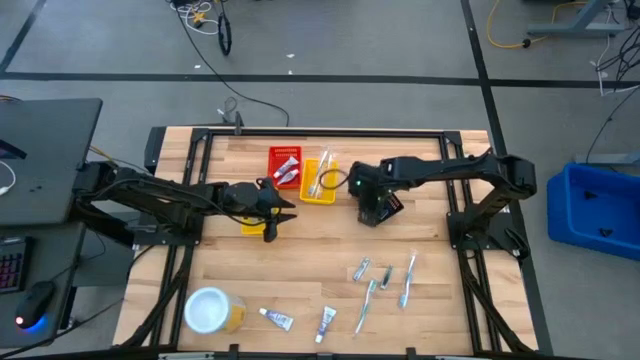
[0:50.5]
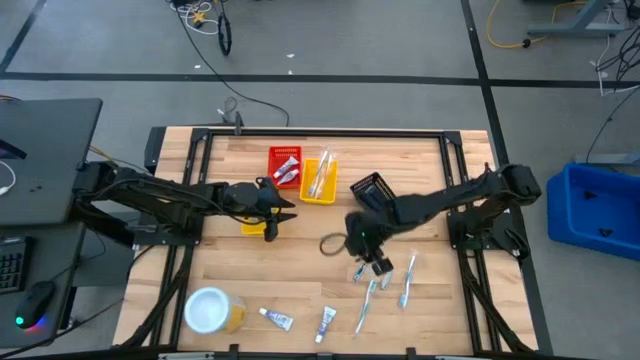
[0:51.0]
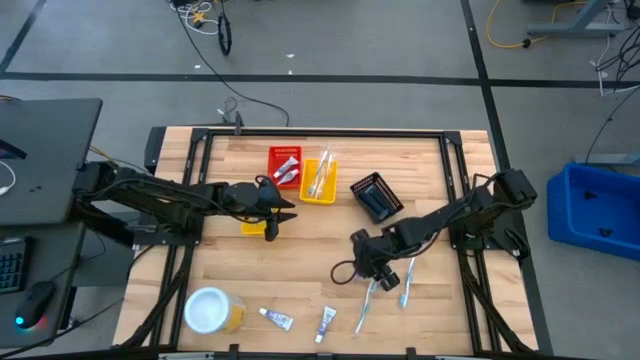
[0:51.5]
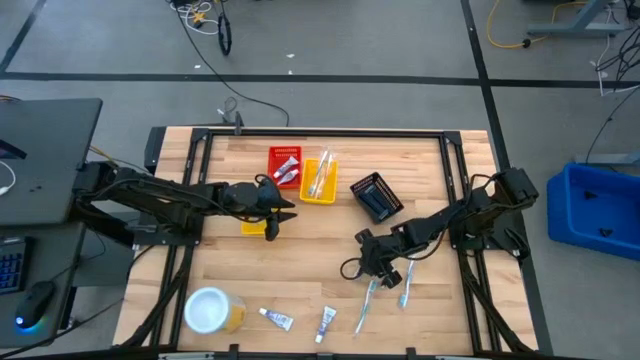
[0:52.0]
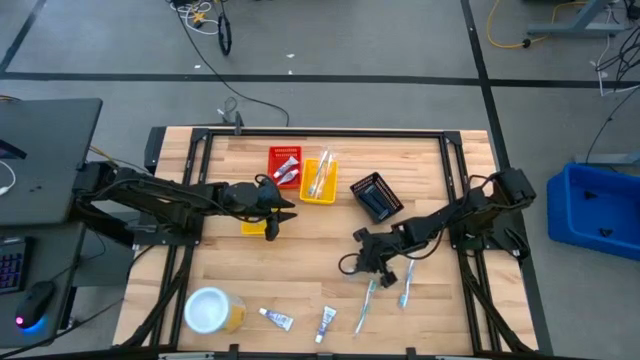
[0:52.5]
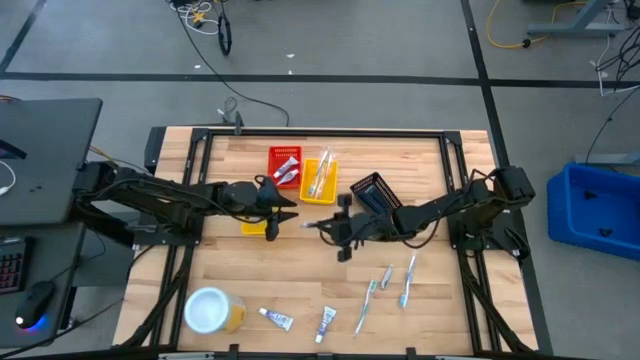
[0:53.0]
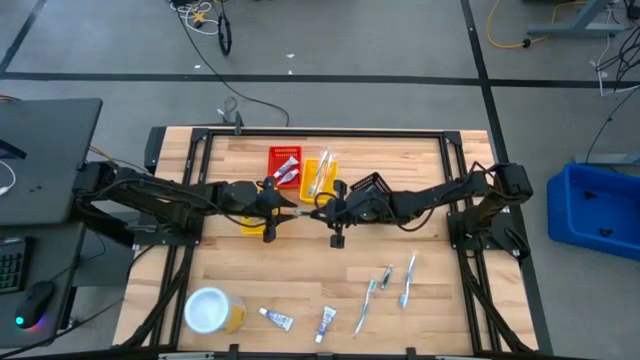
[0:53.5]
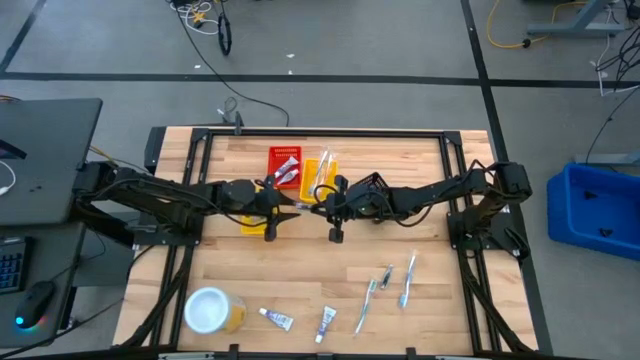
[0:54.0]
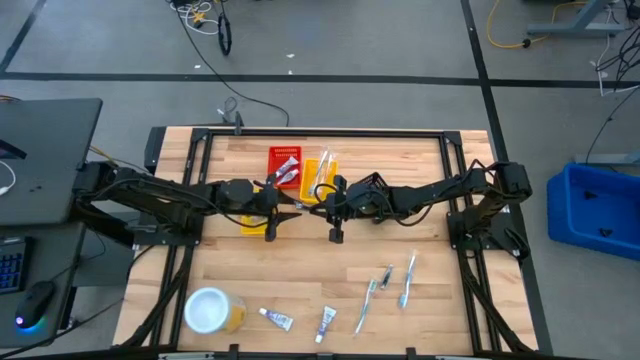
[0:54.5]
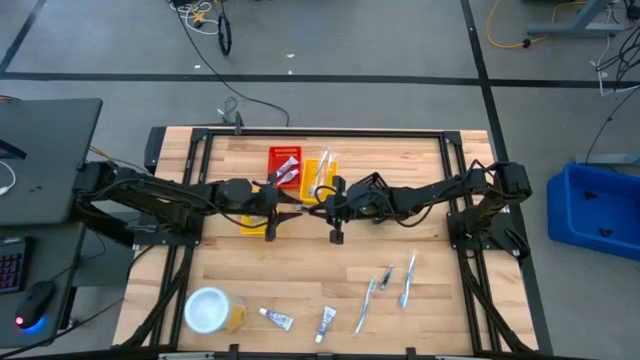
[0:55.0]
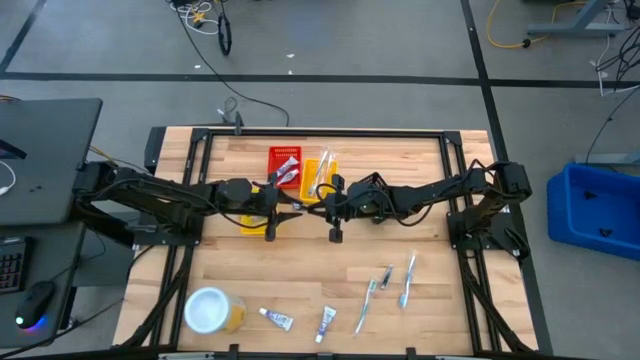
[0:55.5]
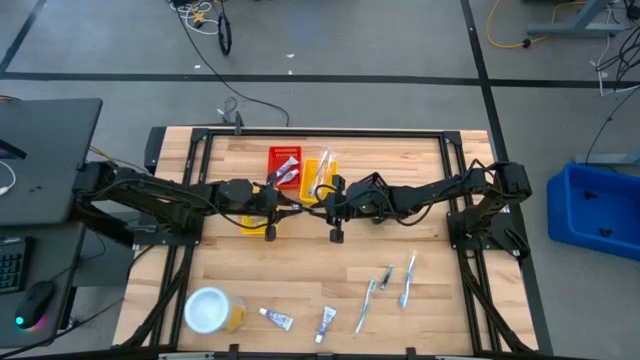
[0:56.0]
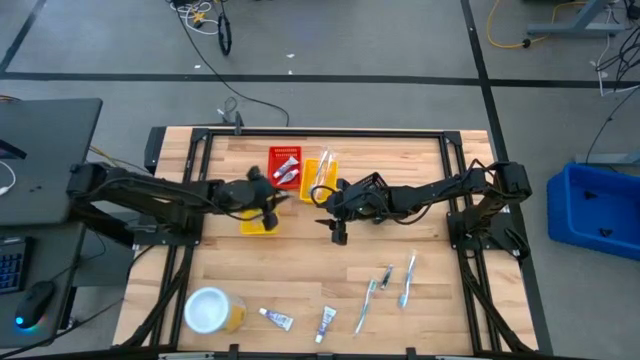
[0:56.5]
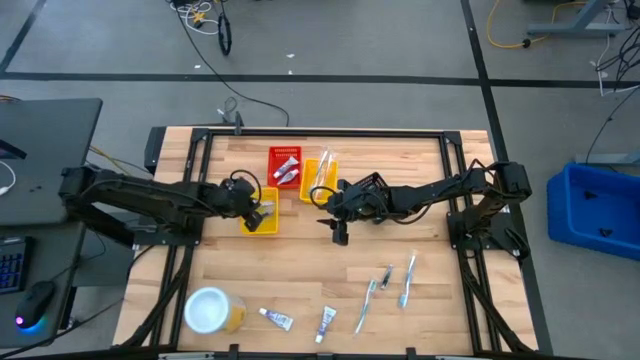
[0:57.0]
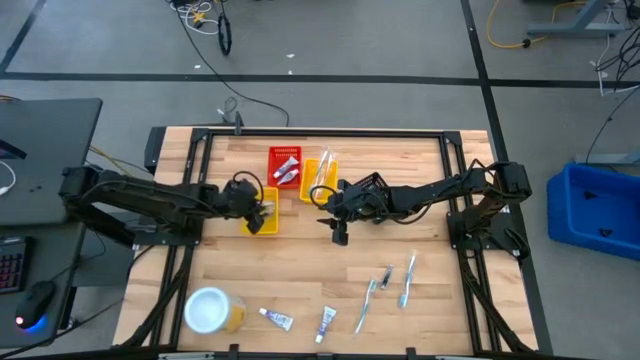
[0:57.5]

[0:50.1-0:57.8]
Task: Pick & Place Travel size toiletries
Put the nail cutter into the left yellow bin

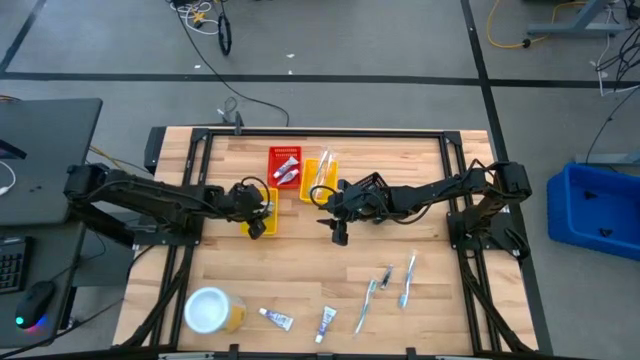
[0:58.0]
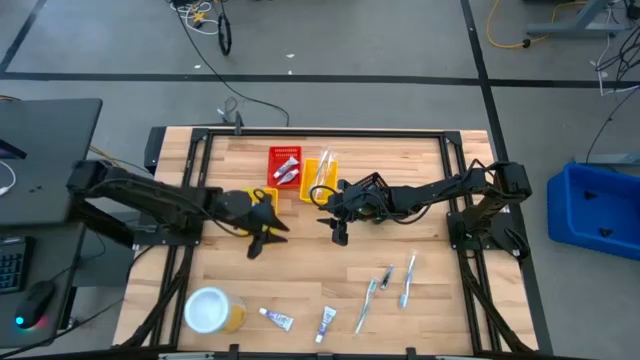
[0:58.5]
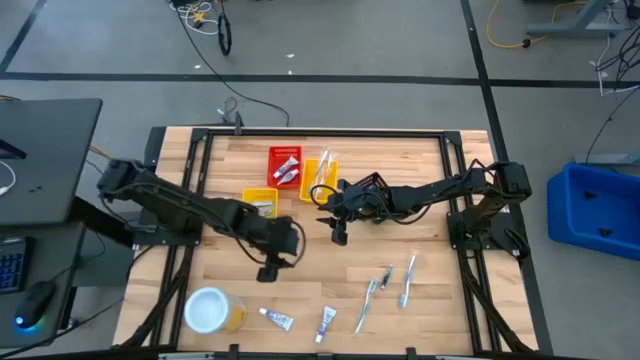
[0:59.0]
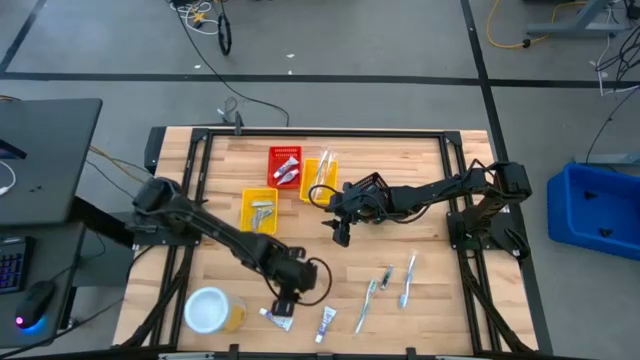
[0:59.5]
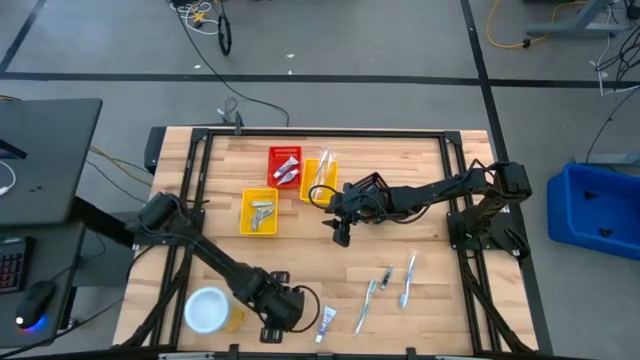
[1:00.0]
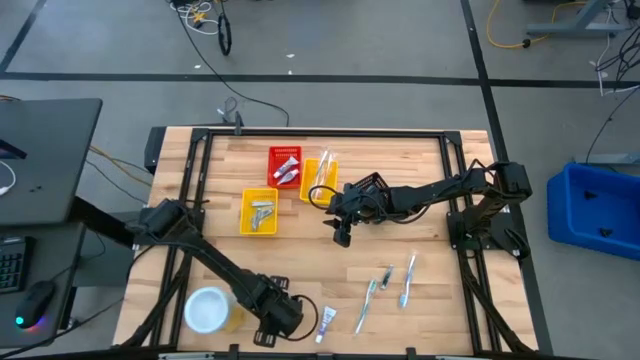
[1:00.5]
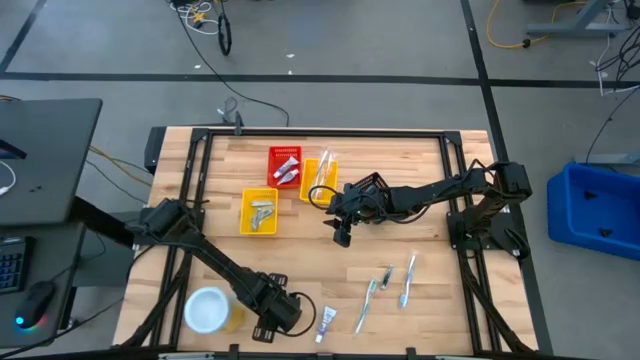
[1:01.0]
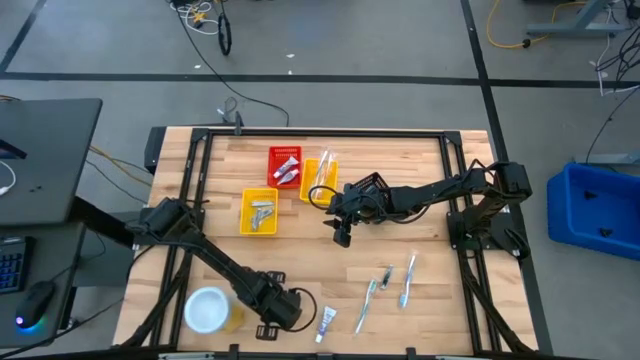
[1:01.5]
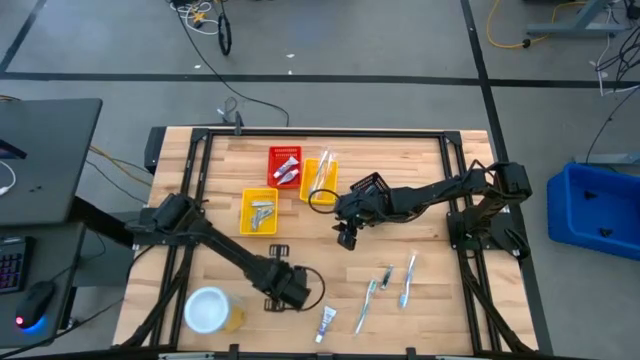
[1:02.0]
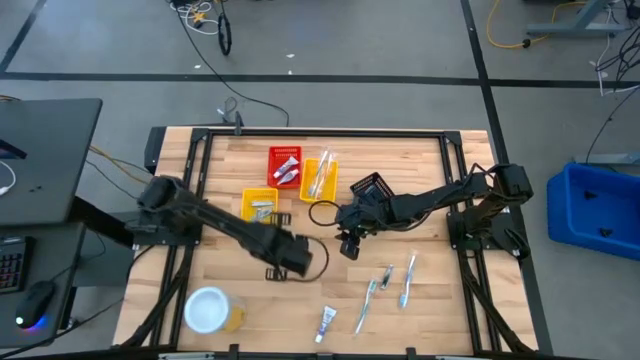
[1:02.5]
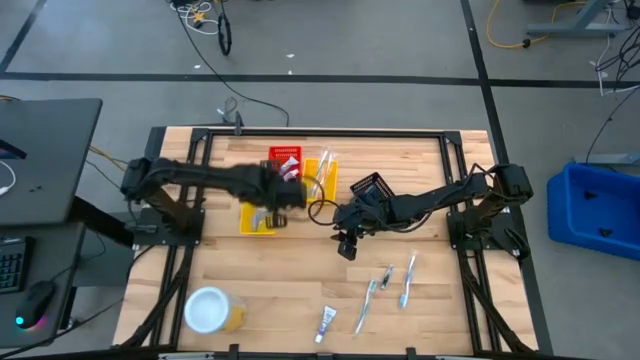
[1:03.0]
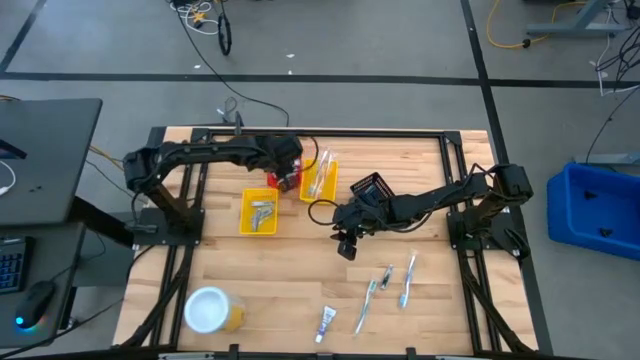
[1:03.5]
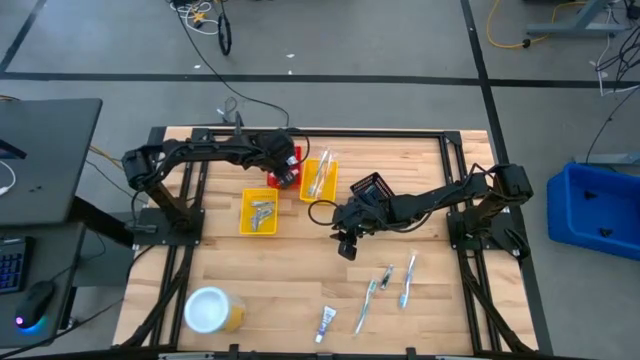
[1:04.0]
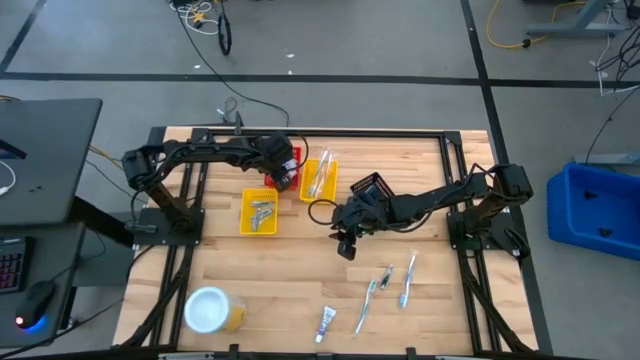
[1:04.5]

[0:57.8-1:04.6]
Put the toothpaste into the red bin

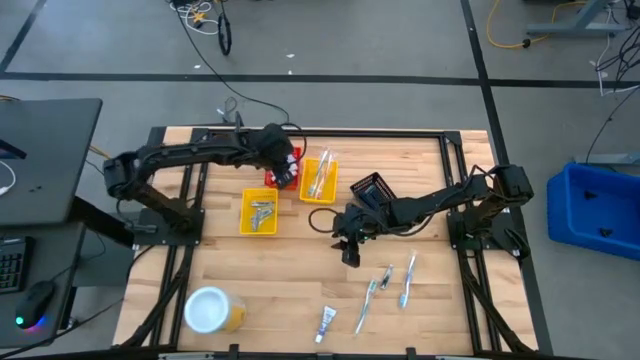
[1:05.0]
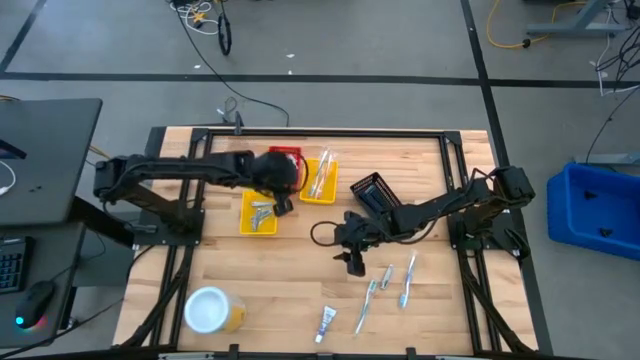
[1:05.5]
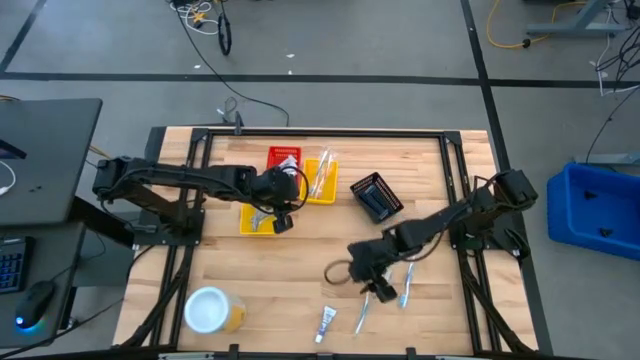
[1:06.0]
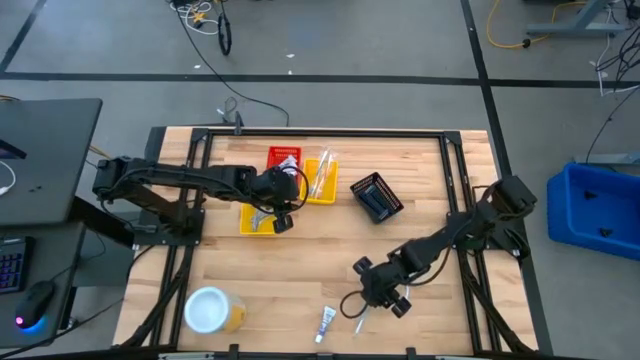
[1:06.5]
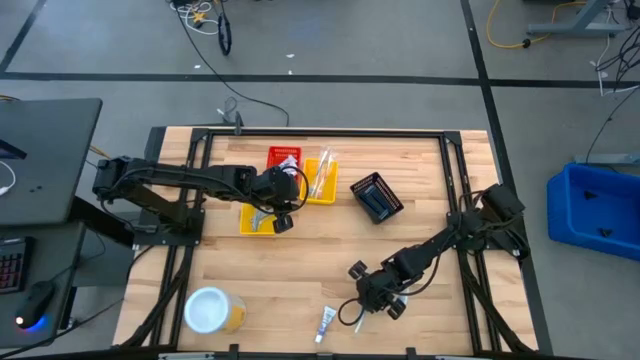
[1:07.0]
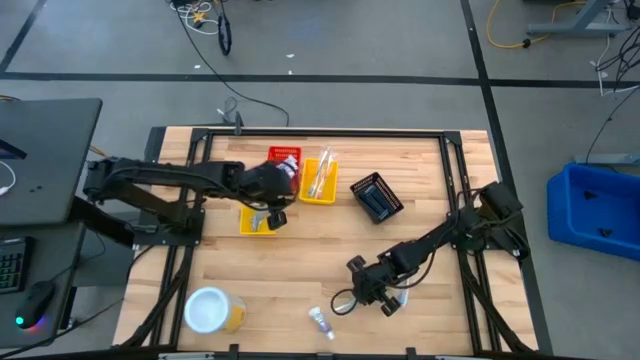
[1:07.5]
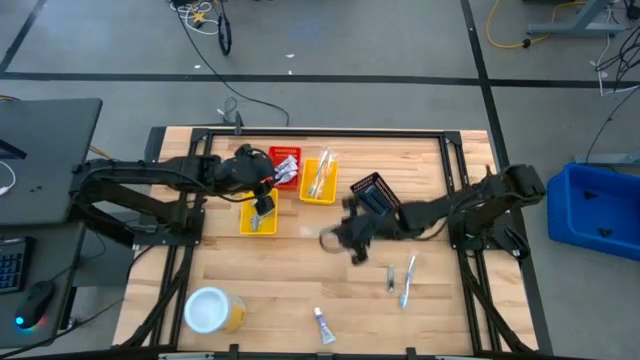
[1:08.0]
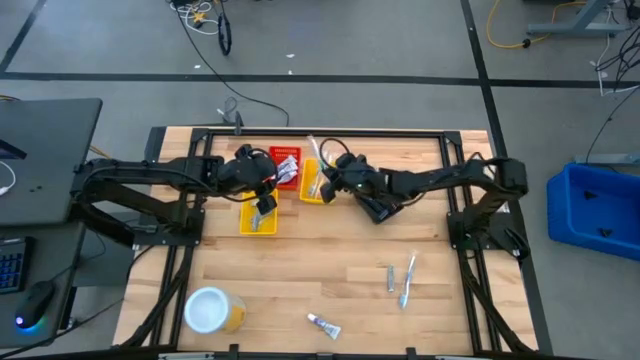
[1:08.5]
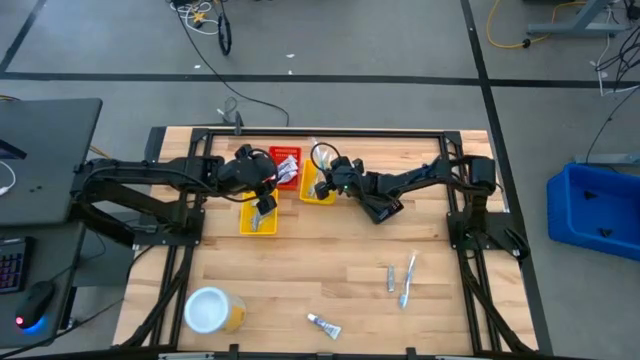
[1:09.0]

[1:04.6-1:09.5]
Put the blue toothbrush into the right yellow bin

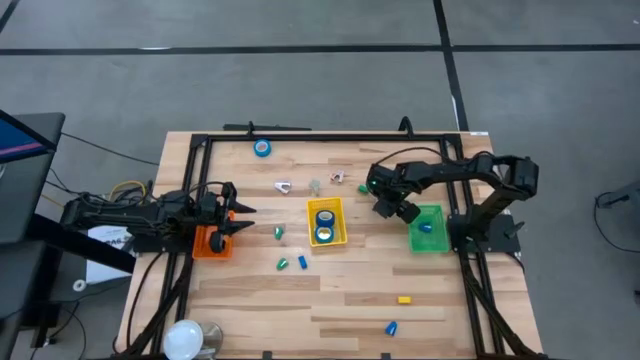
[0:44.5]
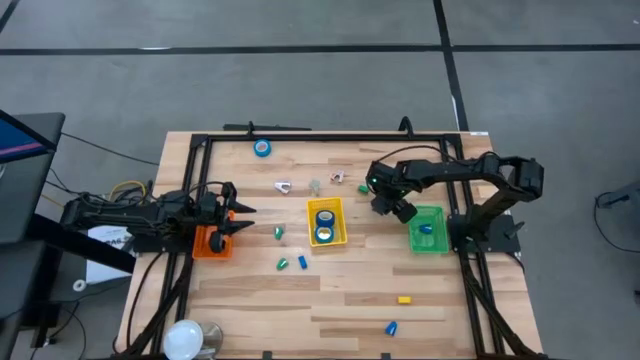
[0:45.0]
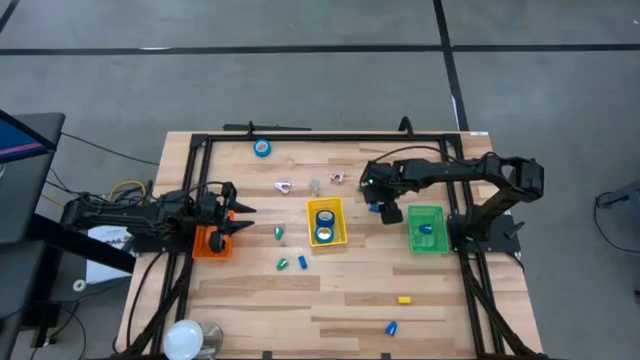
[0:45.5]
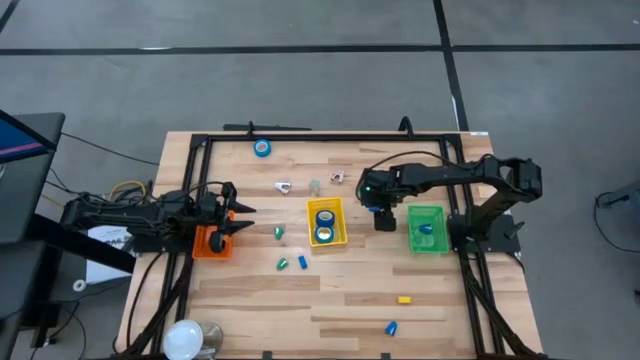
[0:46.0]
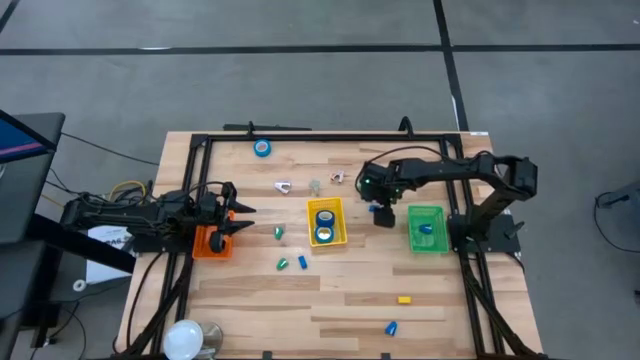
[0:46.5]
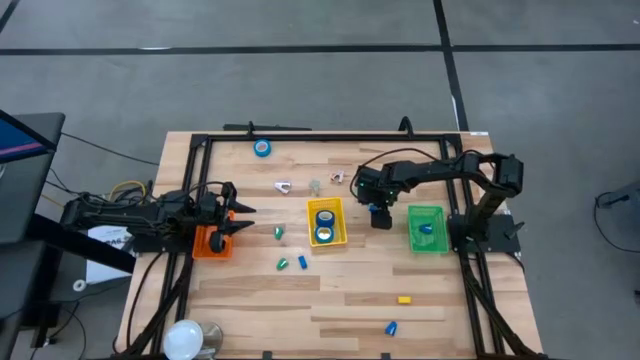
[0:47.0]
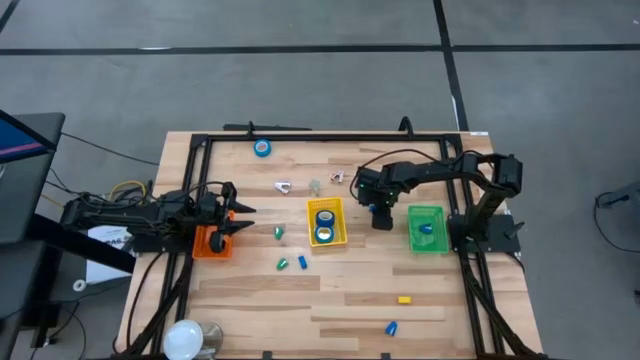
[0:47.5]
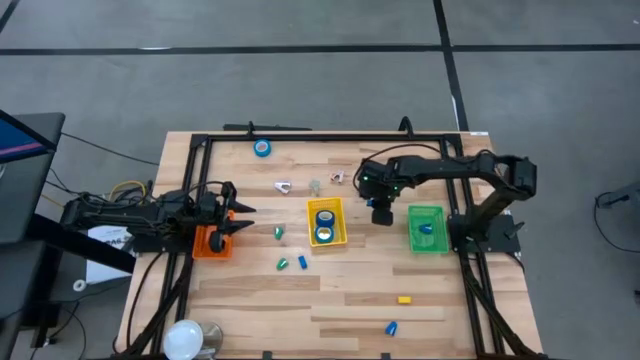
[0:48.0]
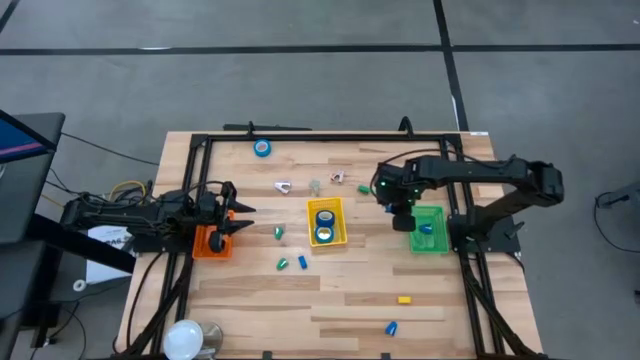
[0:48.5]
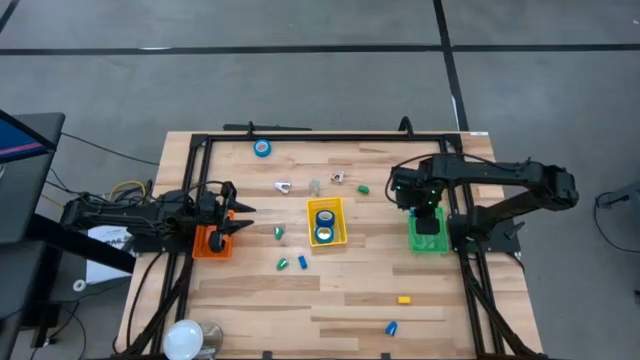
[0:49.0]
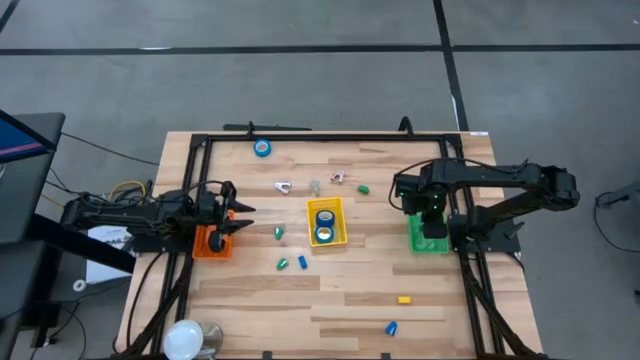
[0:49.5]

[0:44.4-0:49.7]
Task: Pick and place Stapler, Stapler remover, tape
Put the blue stapler into the green basket
